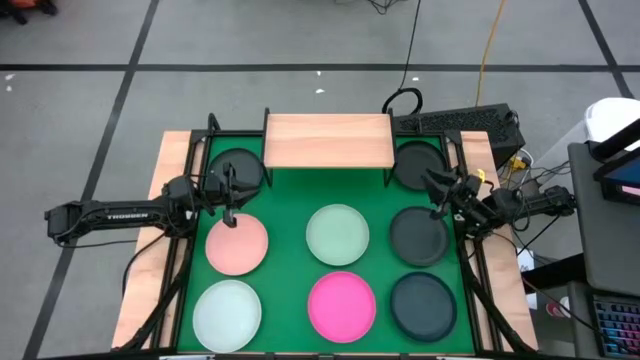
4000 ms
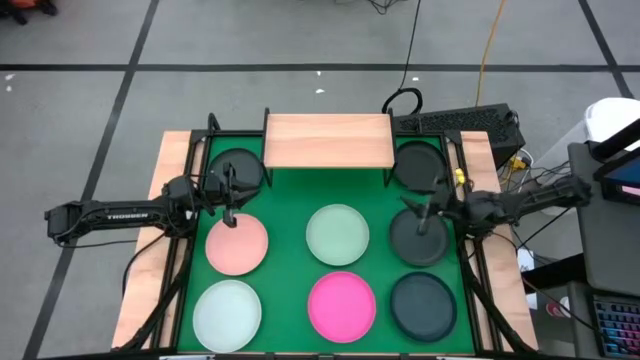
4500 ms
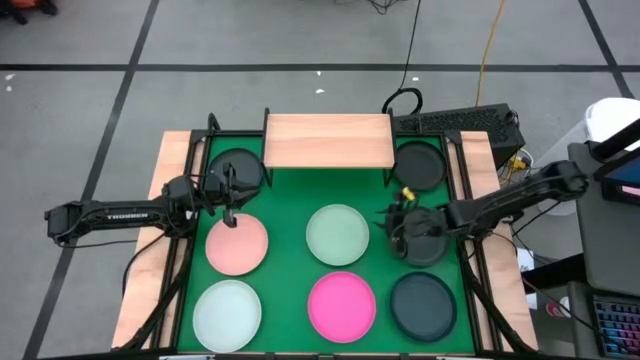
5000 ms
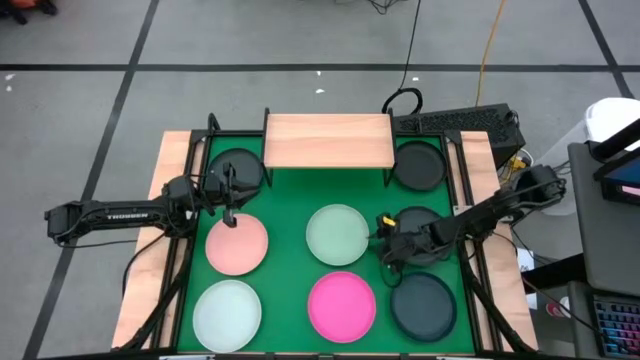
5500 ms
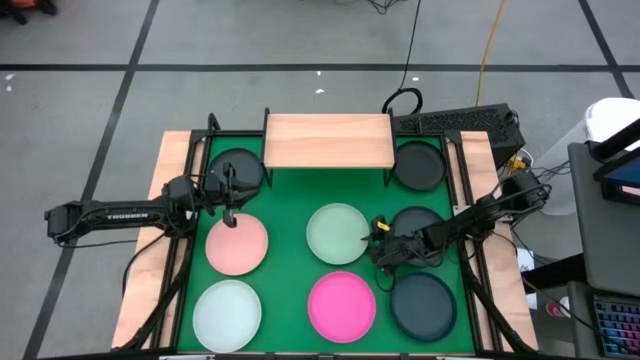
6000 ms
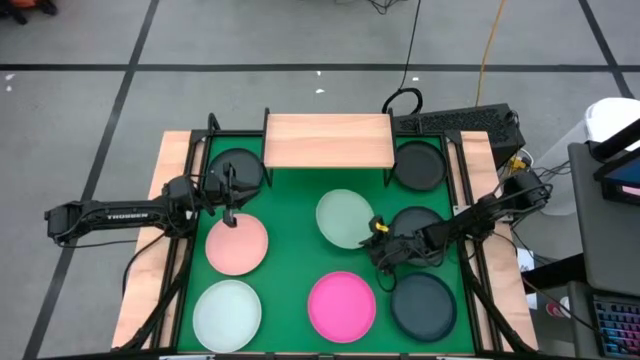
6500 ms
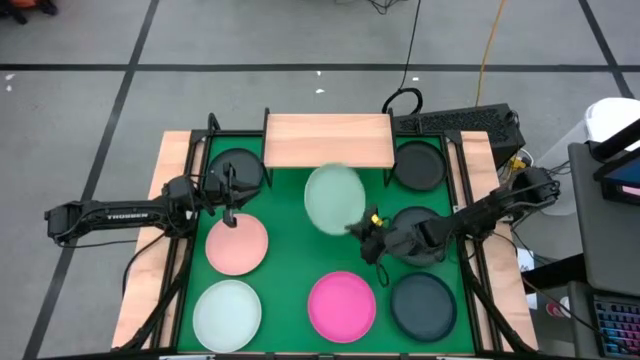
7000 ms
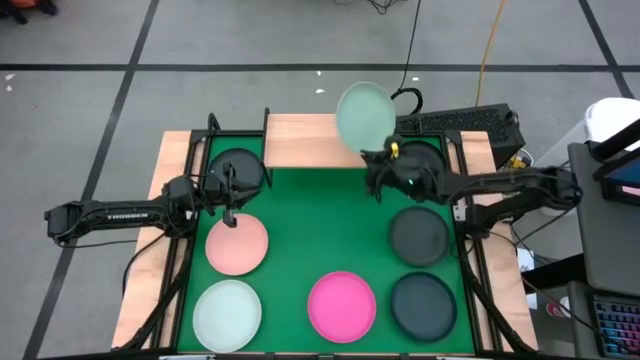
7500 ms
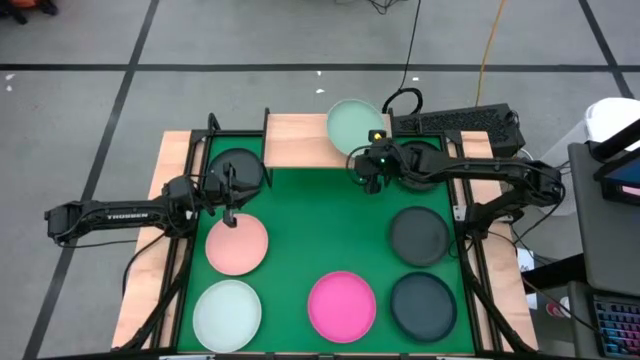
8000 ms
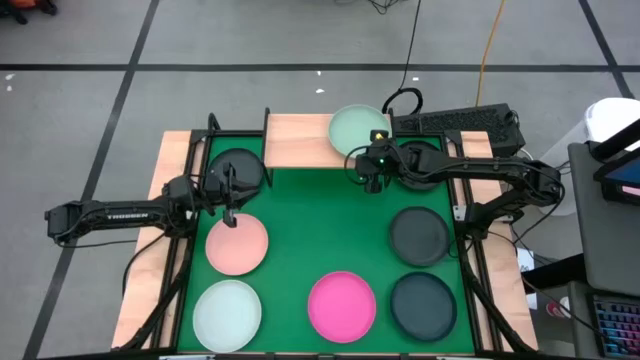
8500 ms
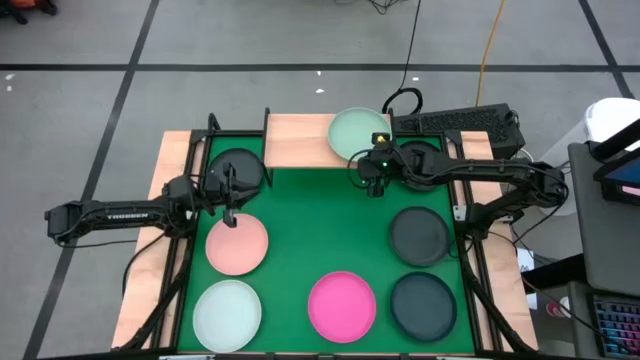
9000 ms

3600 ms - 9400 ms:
Task: Place and stack plates onto a shelf
Put the green plate on the shelf

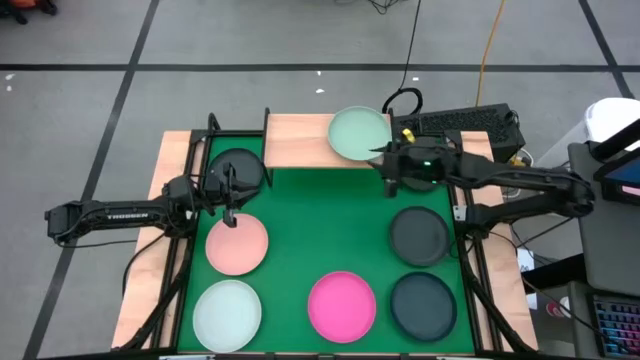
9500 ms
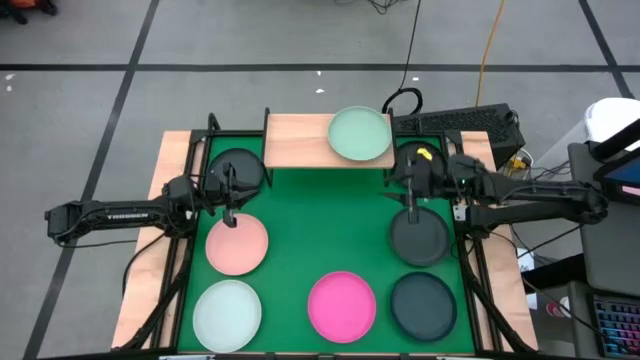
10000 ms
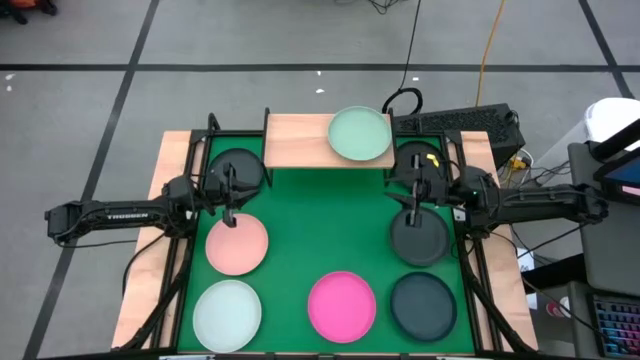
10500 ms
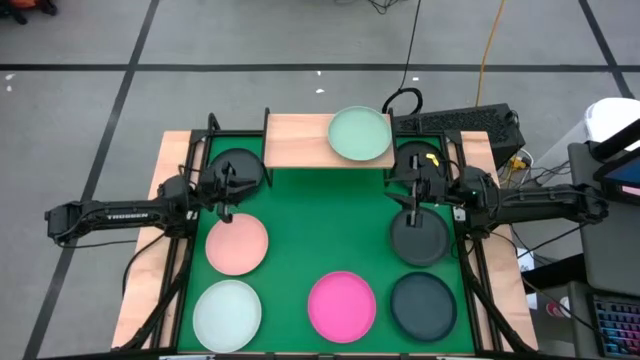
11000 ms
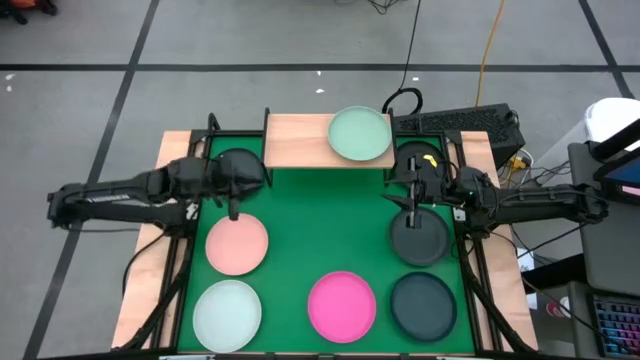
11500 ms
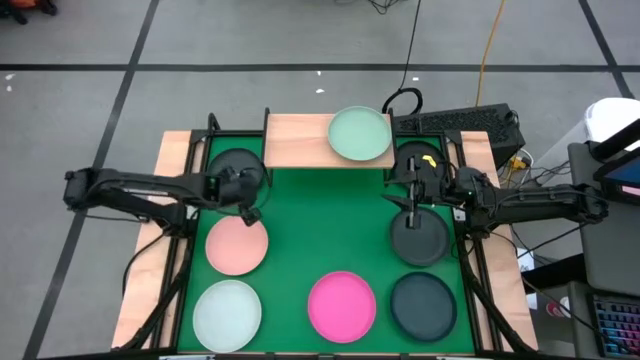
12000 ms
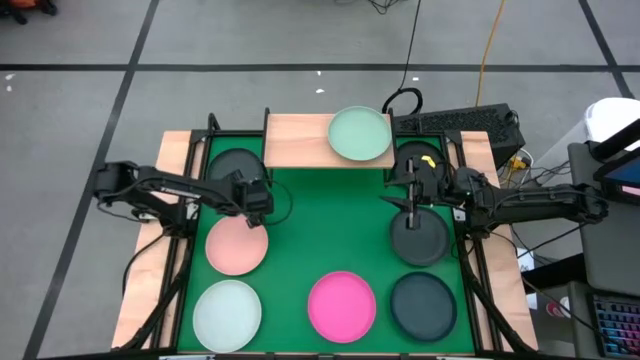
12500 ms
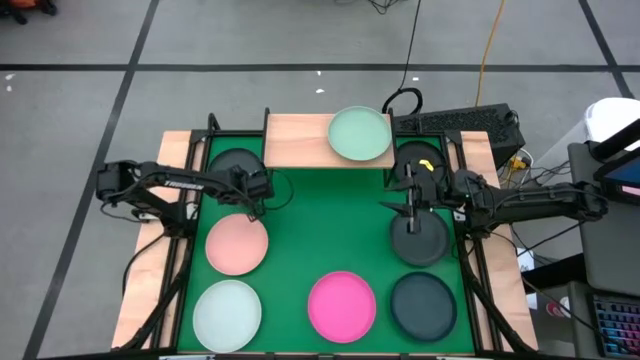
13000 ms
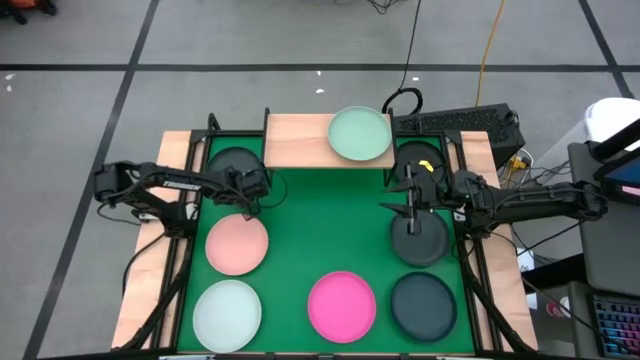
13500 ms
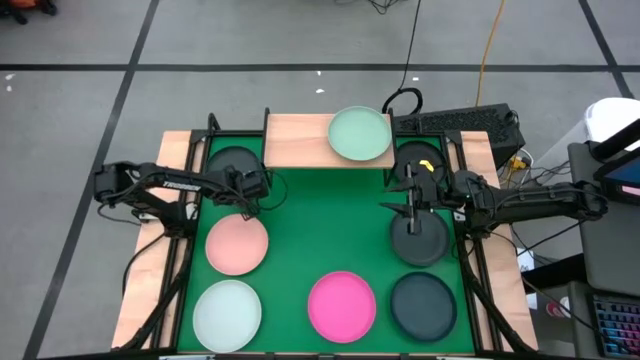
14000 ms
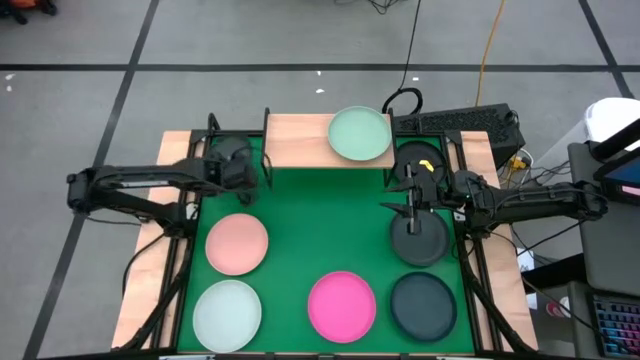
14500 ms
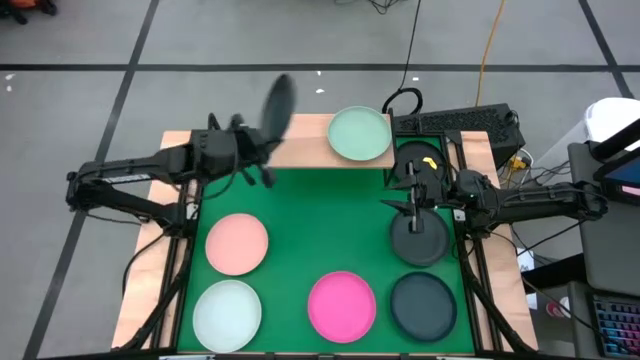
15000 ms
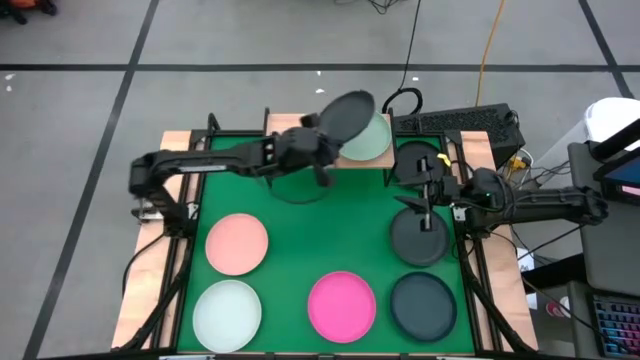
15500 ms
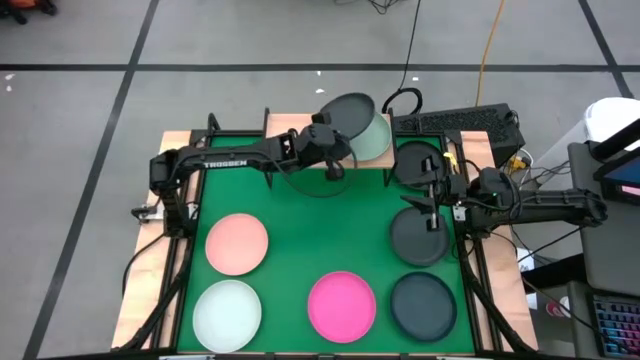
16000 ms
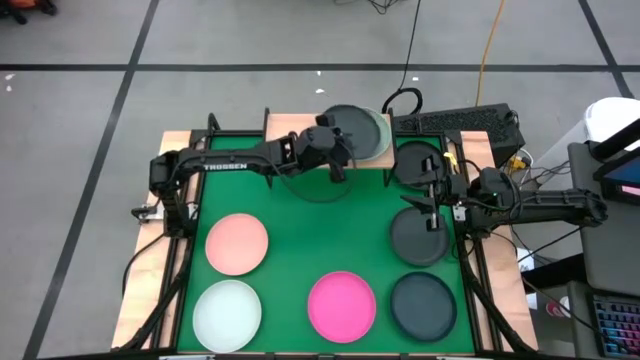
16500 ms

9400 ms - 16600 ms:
Stack the left black plate on top of the green plate on the shelf

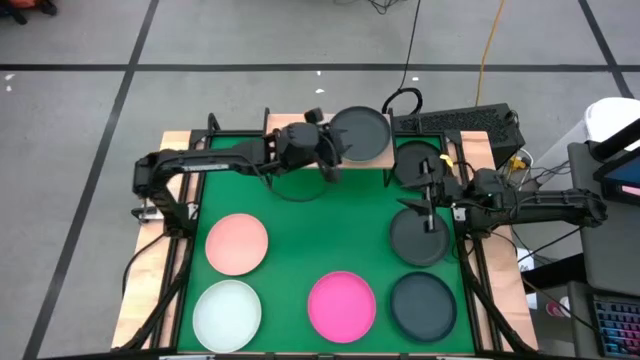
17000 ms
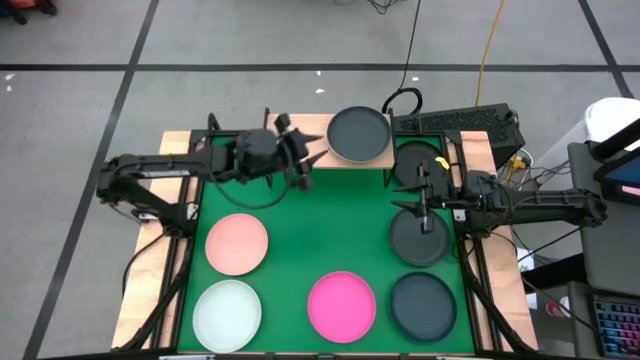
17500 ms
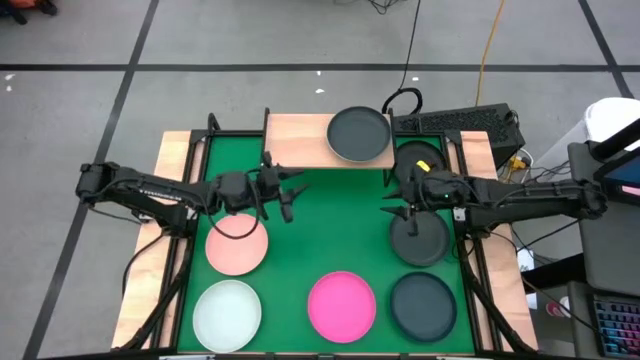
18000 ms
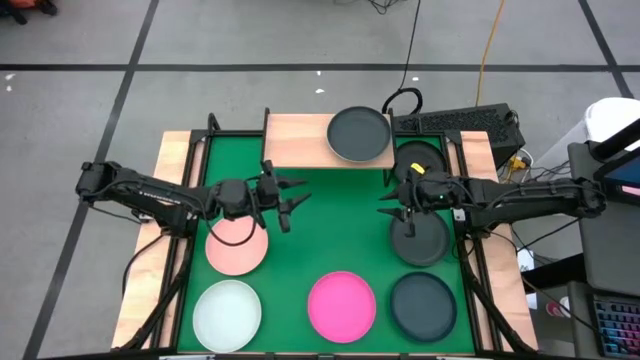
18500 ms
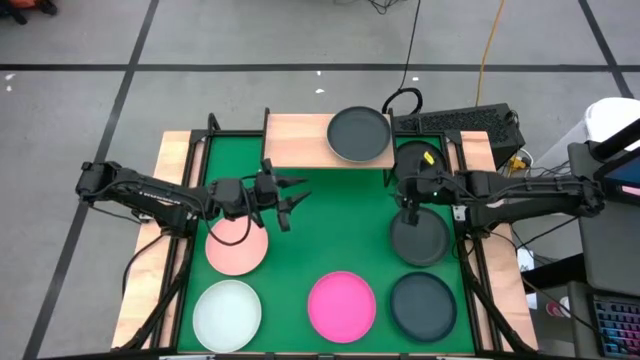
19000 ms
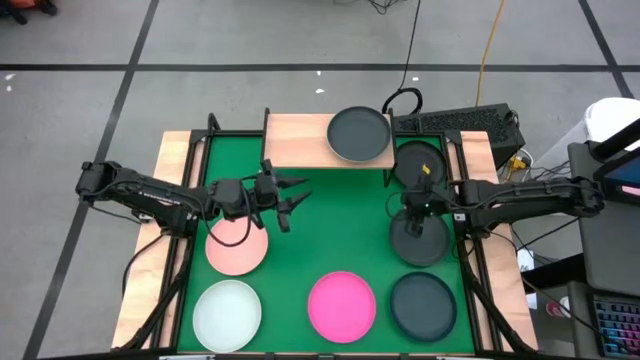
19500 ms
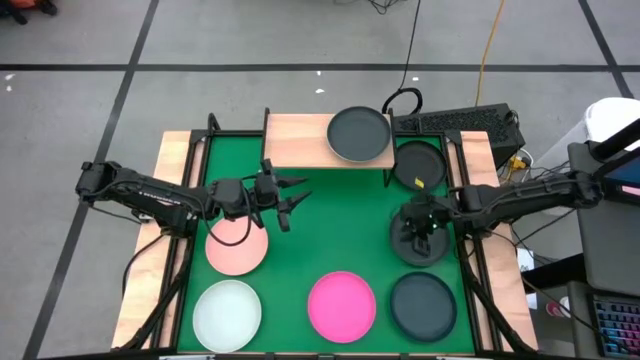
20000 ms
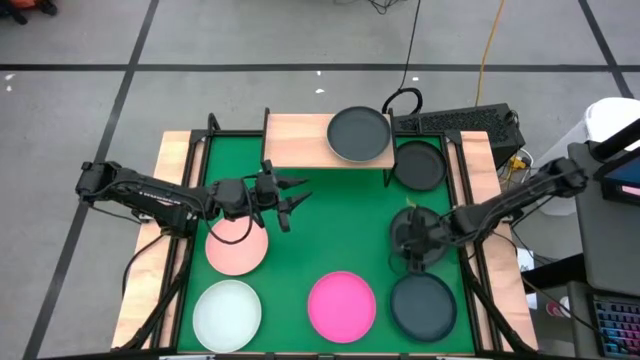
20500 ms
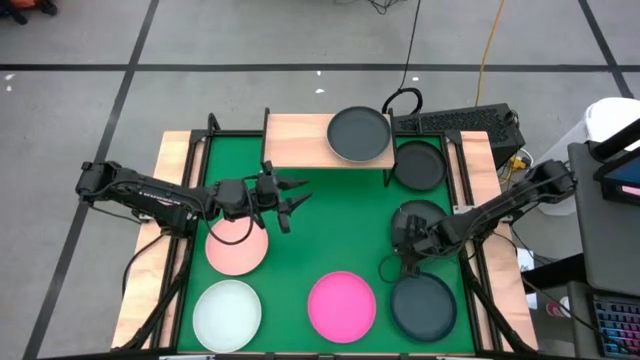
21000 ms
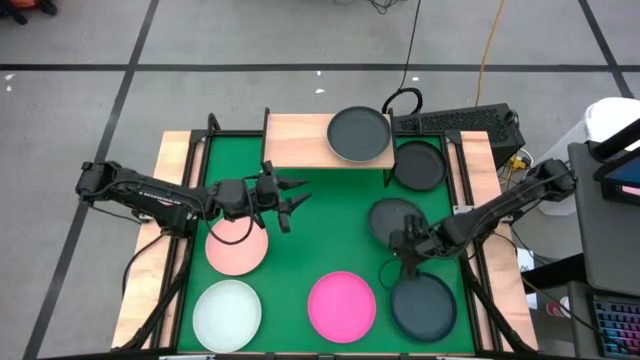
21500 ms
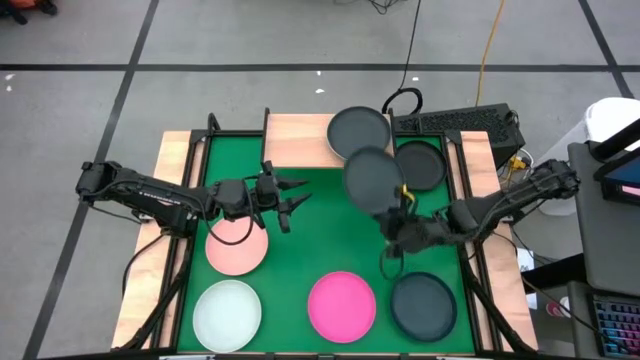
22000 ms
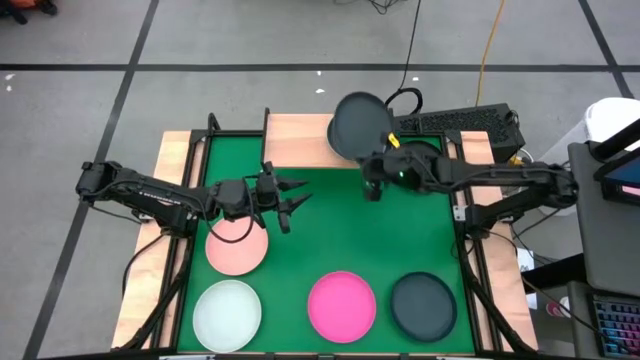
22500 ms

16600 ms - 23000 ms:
Stack the bottom black plate on top of the black plate on the shelf

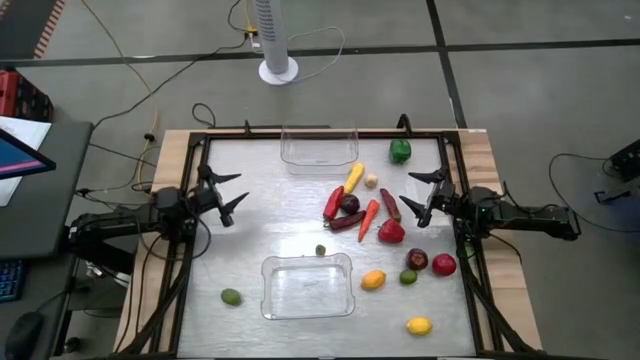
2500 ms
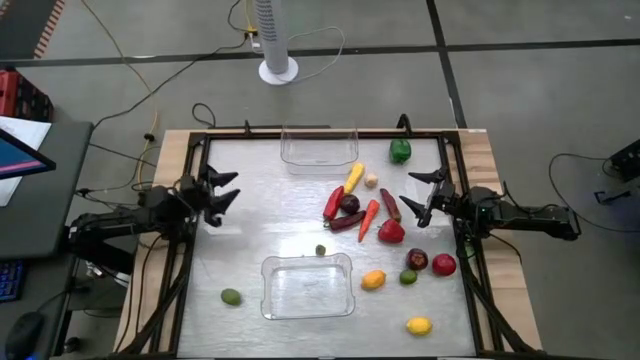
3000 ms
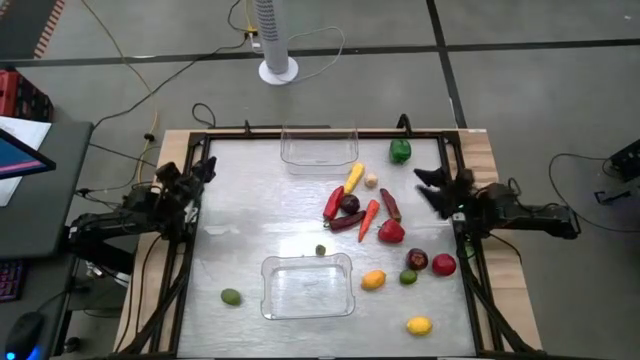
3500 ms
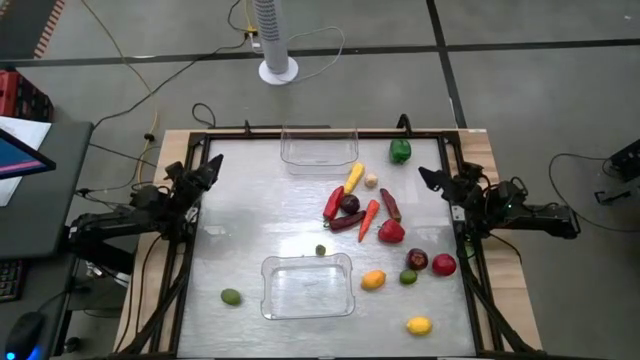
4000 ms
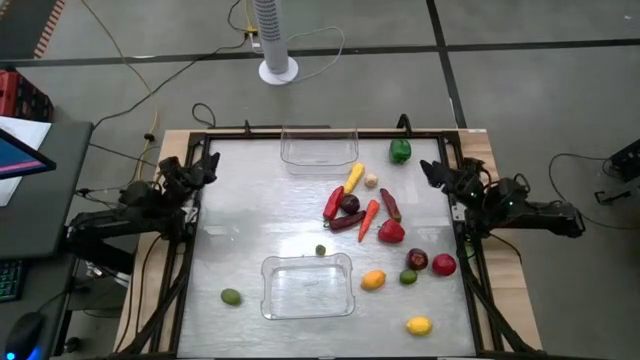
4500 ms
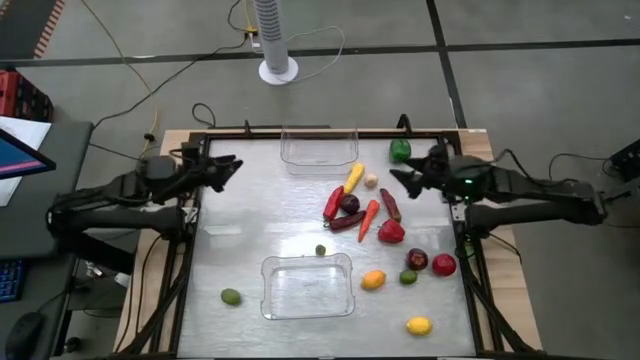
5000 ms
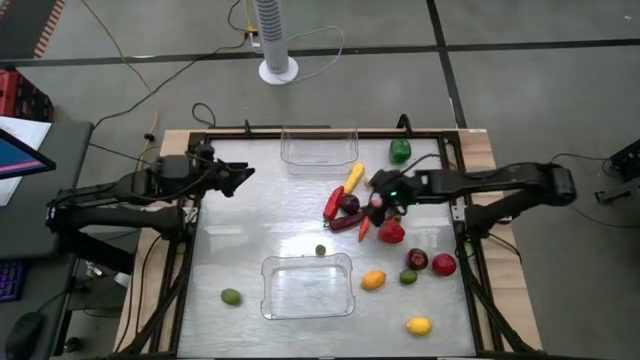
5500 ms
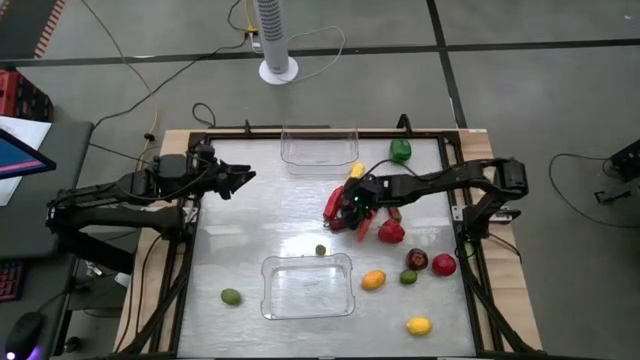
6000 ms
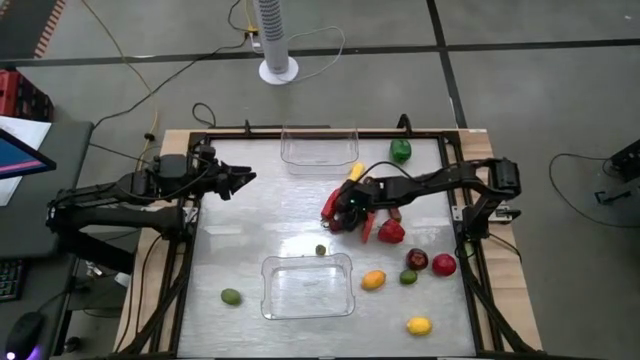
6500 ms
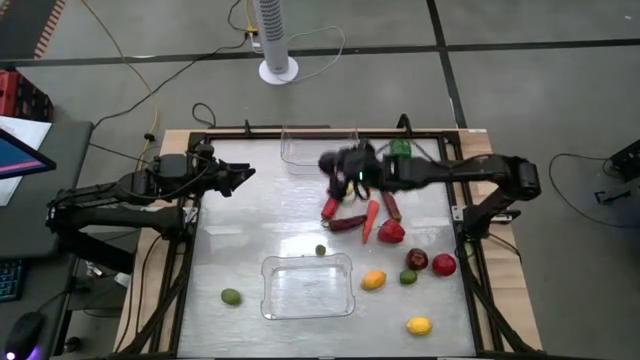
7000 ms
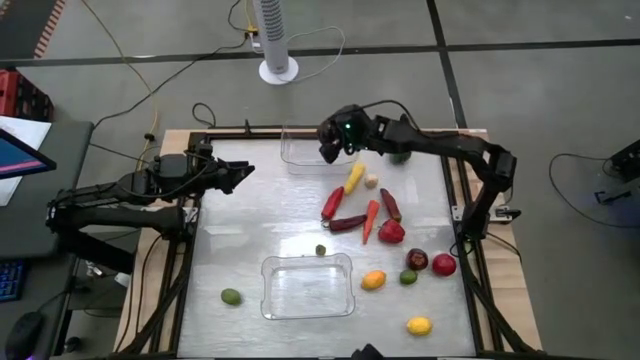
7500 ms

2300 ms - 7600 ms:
Task: Sort produce into baskets
Put the plum into the top transparent bin
